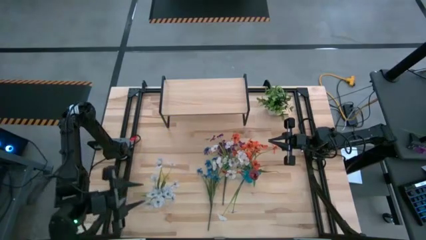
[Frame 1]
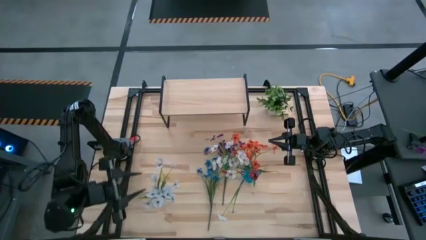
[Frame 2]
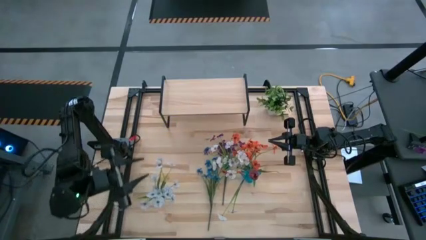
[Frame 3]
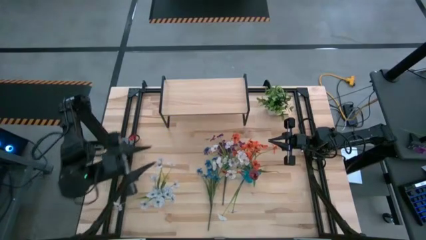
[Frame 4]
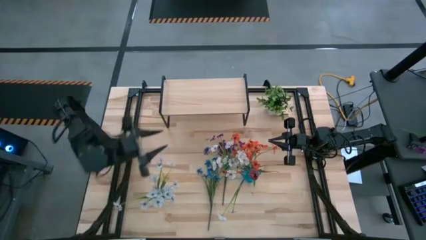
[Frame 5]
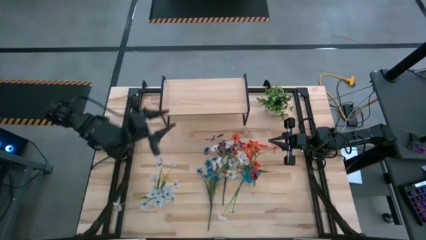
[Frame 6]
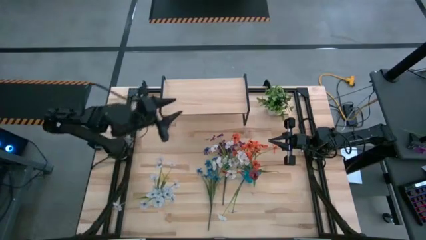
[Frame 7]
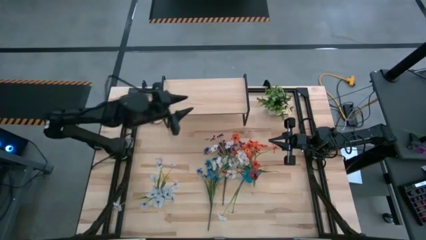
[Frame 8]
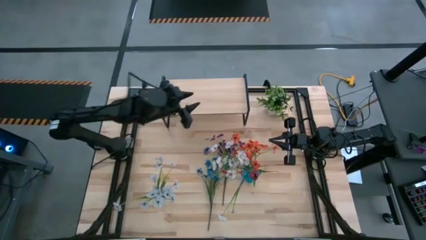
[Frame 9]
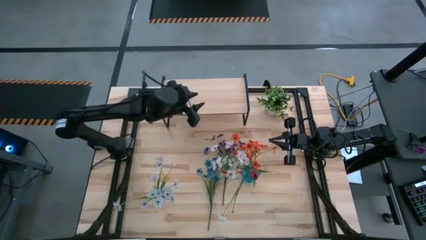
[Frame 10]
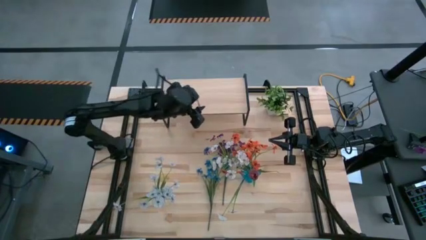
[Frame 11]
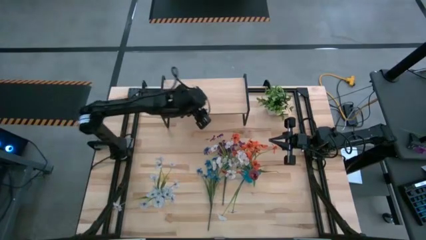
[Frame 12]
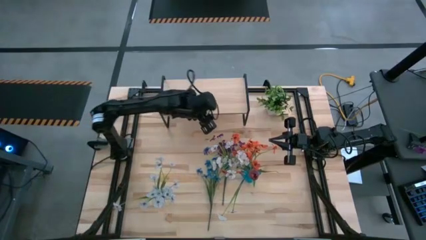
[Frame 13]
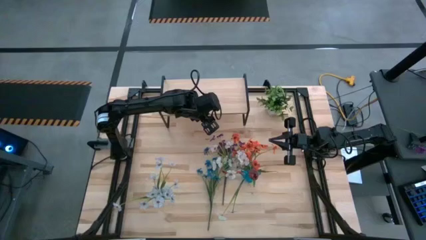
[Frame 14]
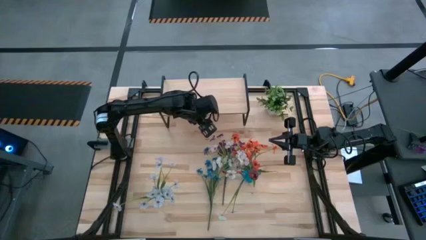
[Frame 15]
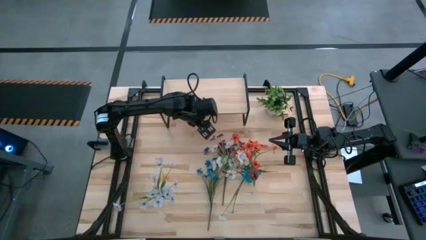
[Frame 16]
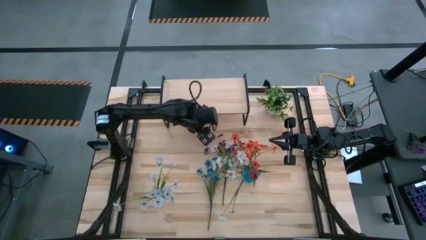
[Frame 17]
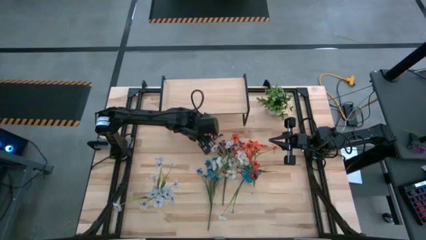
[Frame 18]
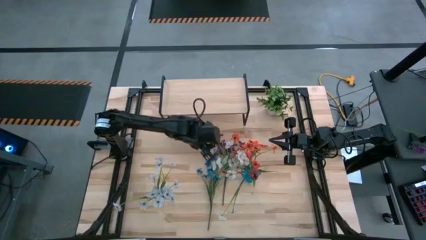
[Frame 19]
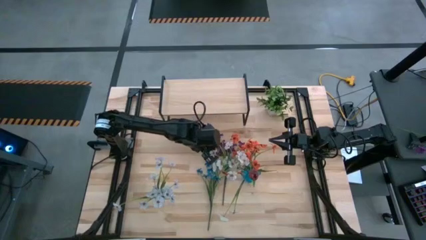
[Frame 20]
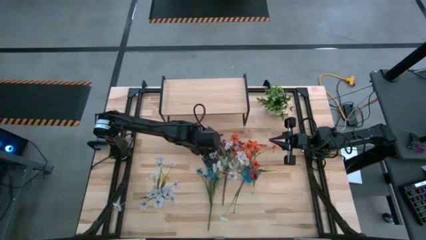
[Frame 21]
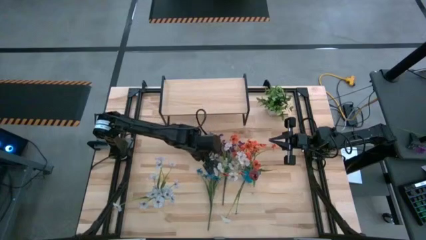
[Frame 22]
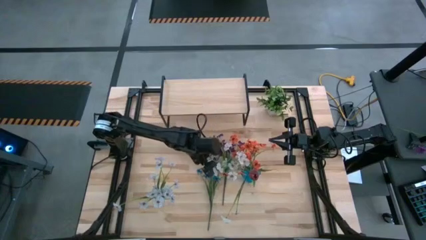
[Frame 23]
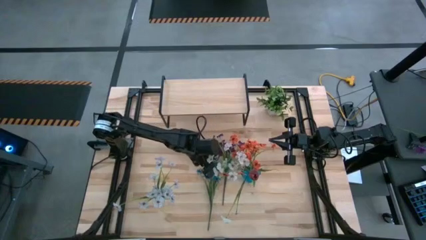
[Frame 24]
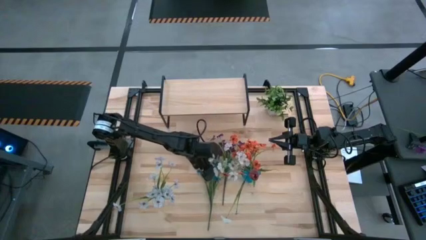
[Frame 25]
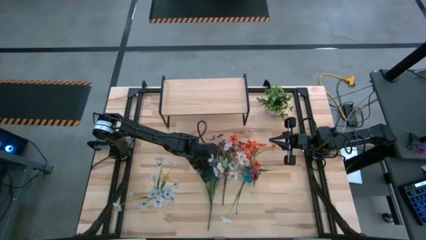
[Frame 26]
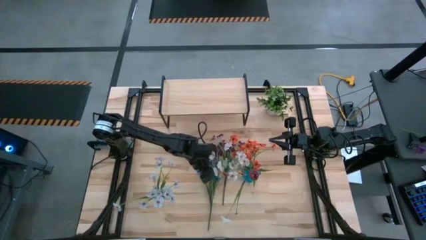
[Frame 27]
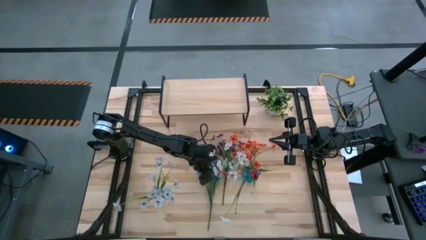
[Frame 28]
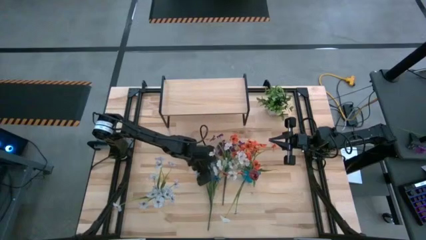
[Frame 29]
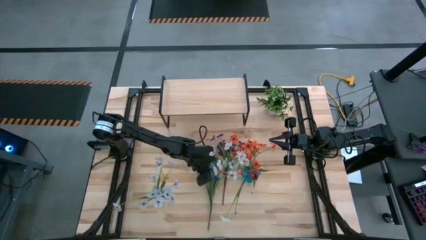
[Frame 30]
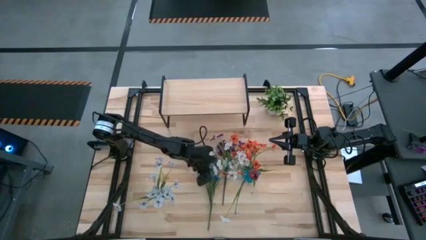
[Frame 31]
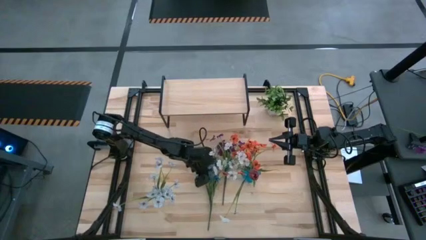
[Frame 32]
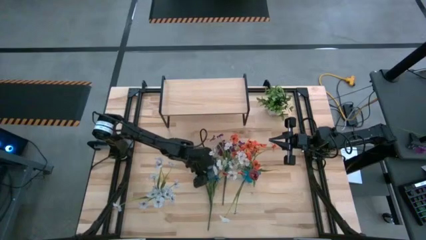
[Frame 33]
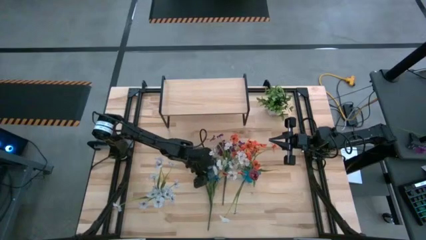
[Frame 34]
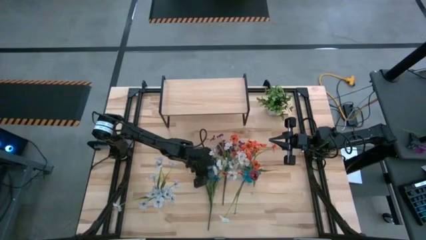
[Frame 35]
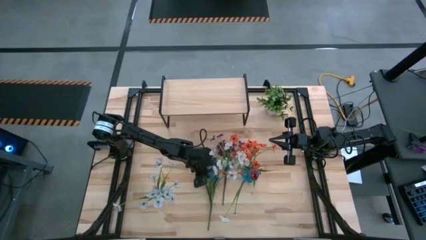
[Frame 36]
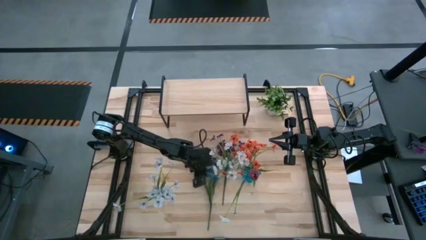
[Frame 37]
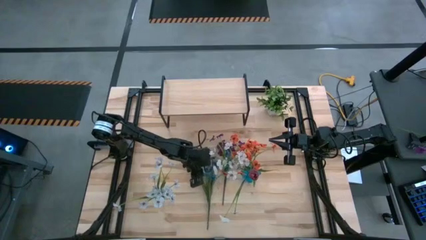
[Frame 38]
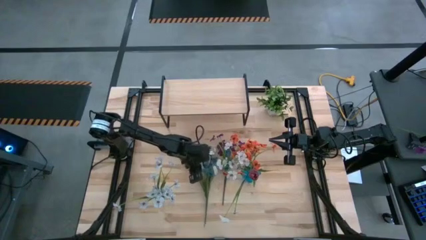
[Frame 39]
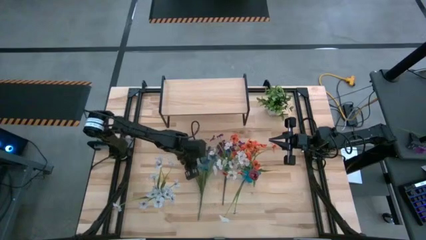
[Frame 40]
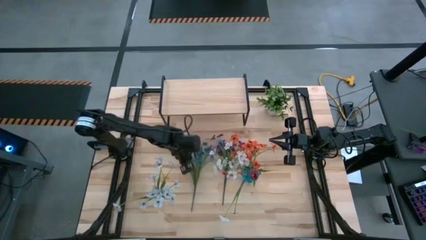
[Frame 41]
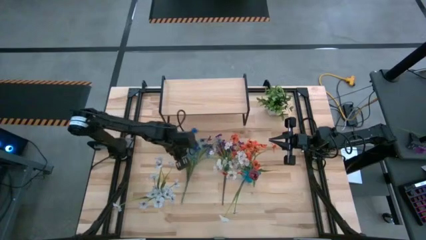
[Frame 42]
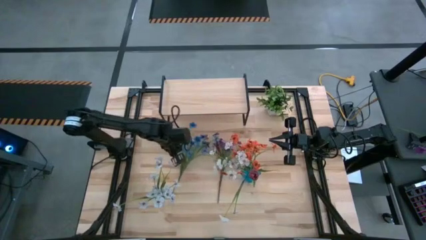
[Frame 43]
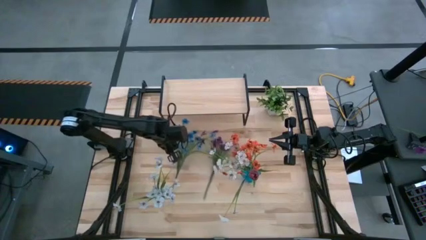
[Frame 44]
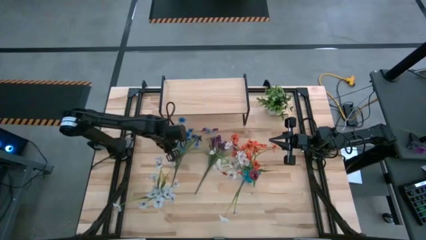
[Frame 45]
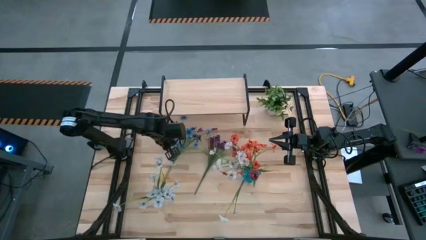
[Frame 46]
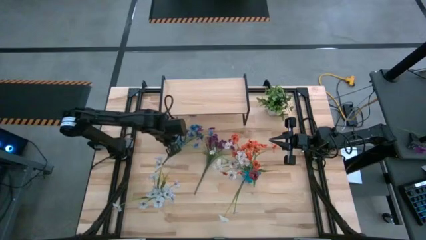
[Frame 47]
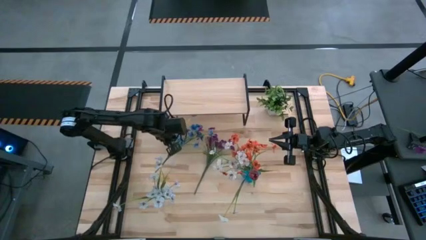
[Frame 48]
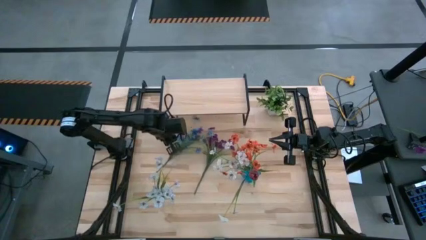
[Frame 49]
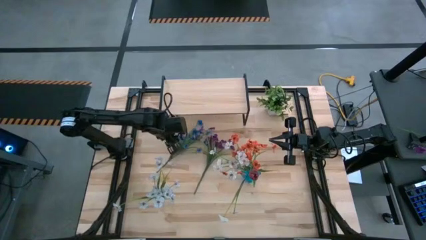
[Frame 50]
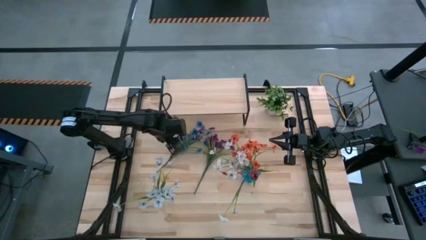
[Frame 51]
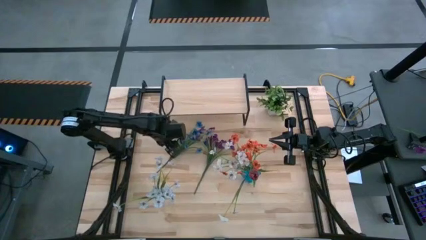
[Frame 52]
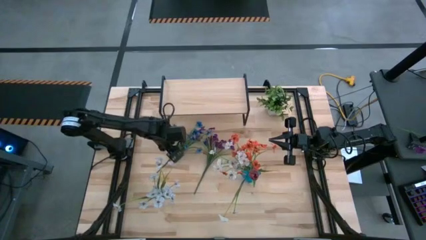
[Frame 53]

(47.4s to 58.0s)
Task: Pick and place flowers into a vace then onto a shelf
Put the blue flowers into the transparent vase

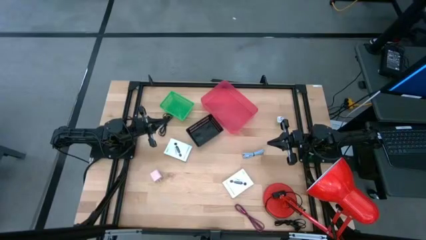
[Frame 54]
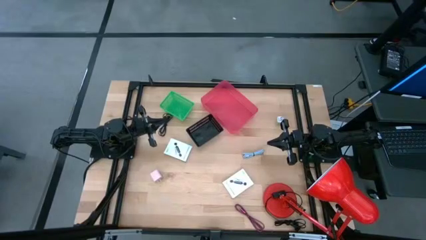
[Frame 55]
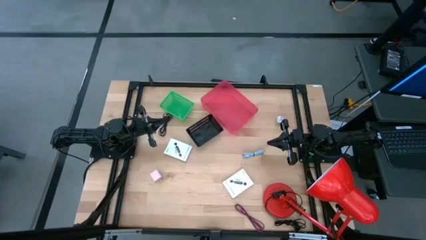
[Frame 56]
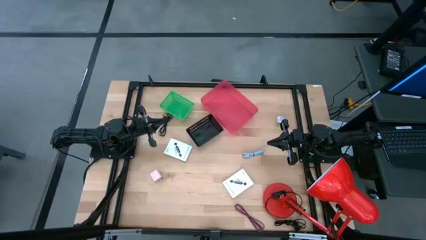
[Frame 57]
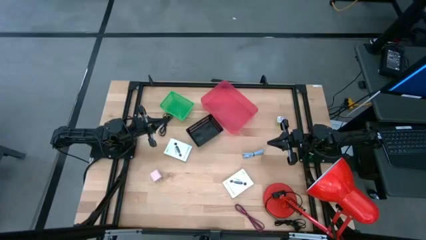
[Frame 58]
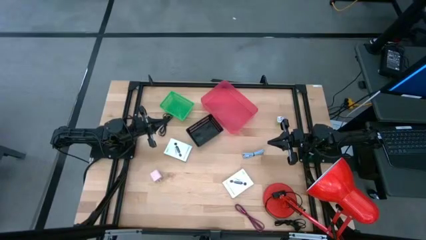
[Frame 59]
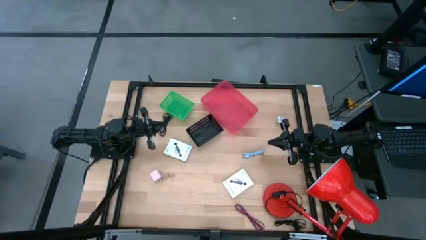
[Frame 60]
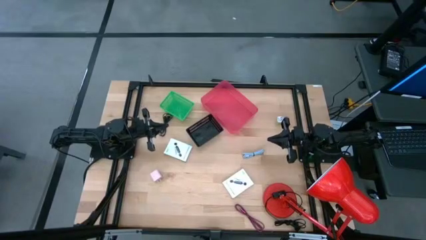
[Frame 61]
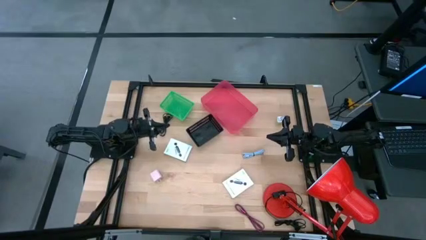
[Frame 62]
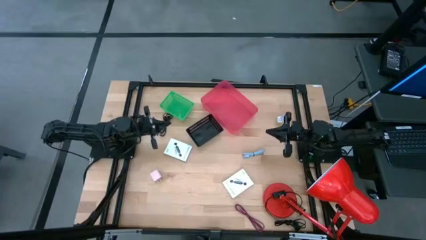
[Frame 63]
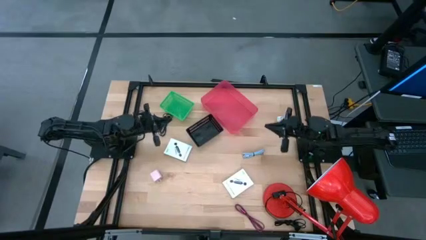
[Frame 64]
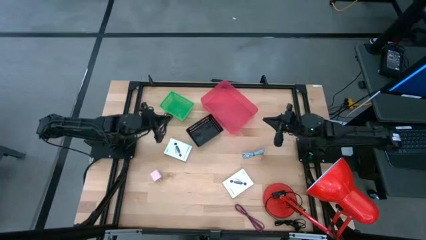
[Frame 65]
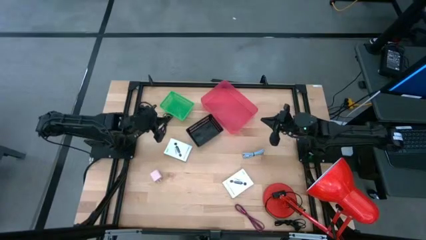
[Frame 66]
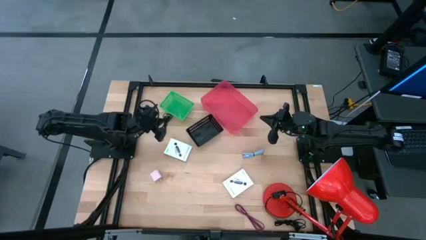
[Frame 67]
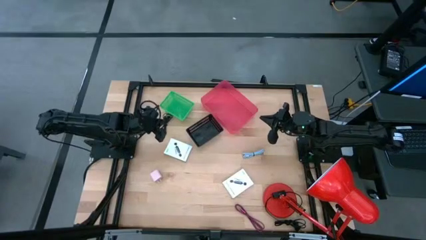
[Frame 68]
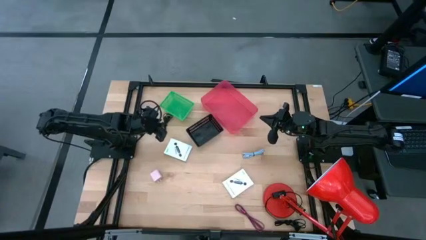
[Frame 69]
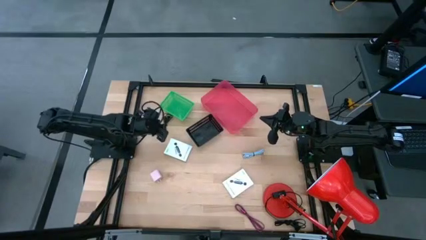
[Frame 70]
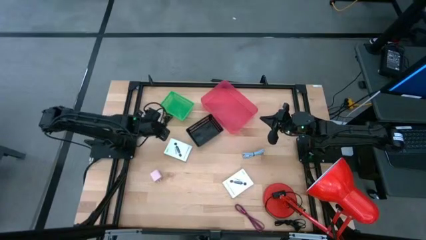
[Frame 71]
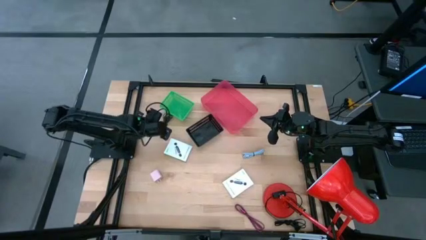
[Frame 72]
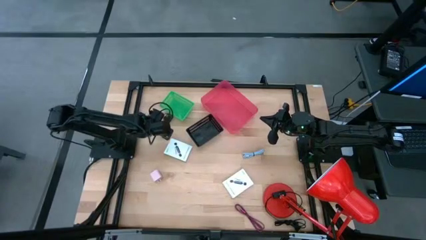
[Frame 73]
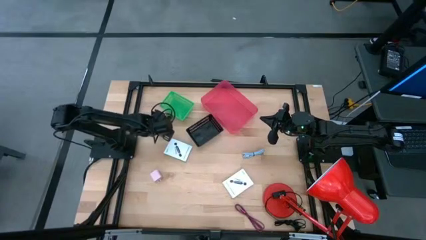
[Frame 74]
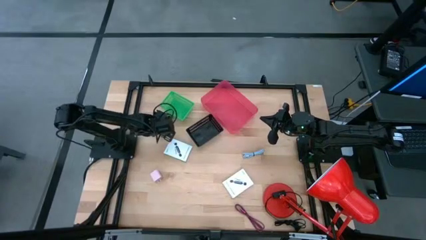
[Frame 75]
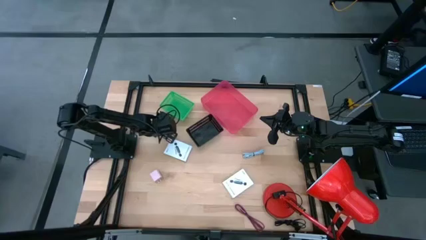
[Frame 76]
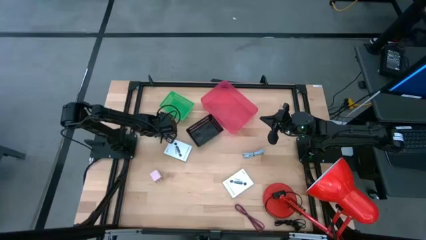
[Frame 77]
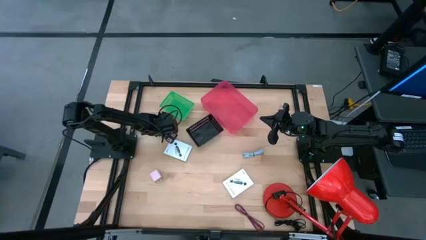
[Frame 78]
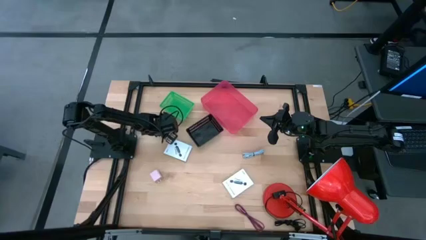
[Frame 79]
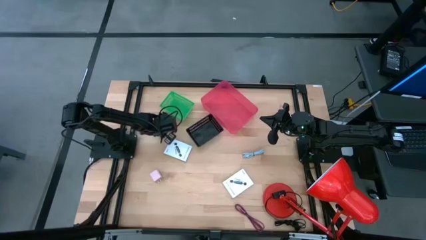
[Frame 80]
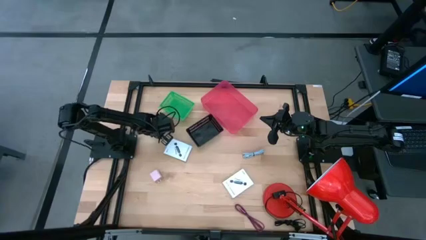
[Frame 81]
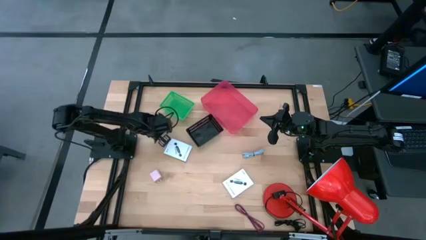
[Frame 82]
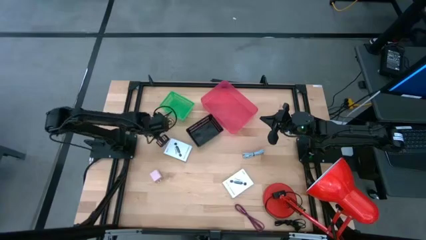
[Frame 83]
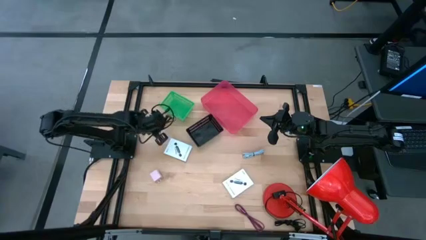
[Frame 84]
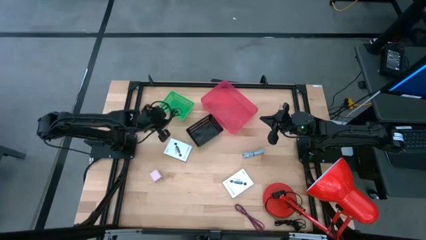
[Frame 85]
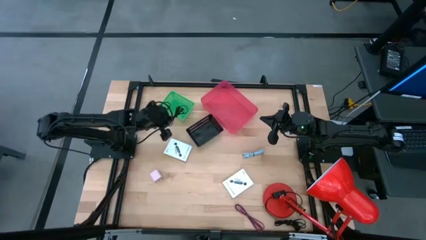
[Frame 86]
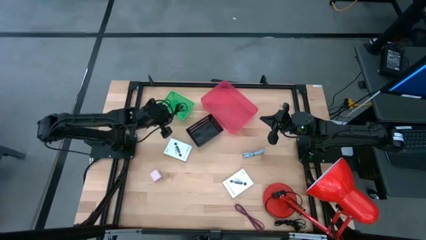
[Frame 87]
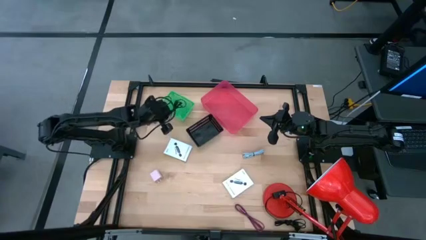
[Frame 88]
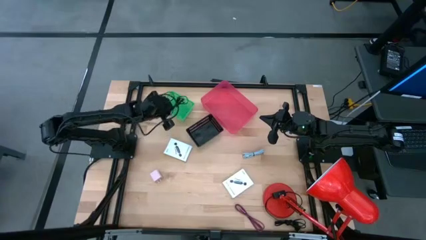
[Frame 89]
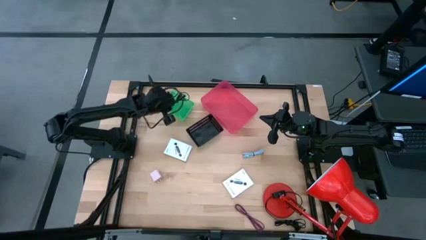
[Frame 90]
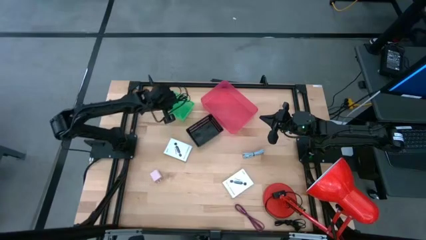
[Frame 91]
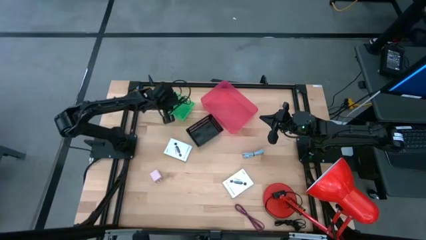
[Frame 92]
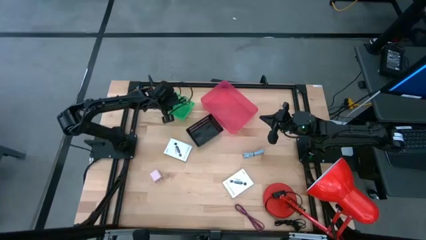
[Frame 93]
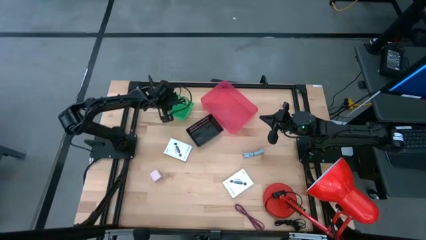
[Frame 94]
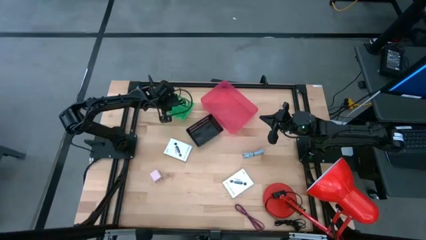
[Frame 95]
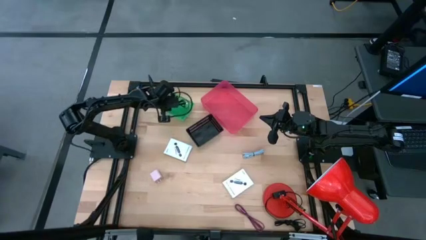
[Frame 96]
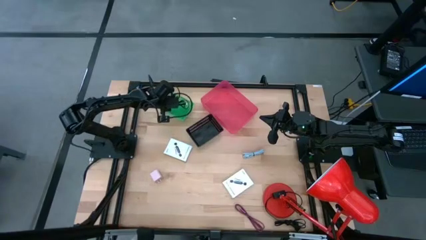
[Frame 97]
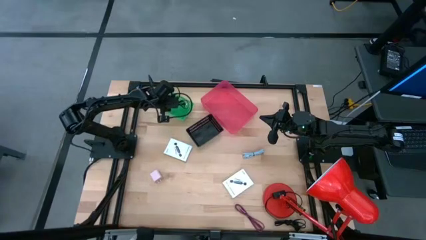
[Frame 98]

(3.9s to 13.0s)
Task: Pick and place items into bin
Put the black charger cable into the green bin
